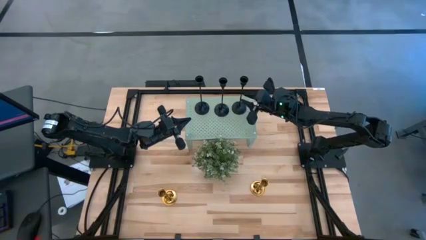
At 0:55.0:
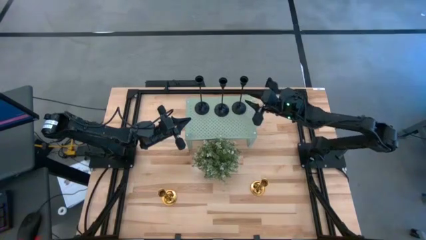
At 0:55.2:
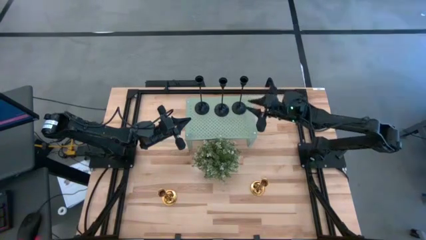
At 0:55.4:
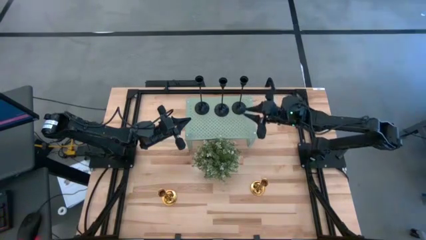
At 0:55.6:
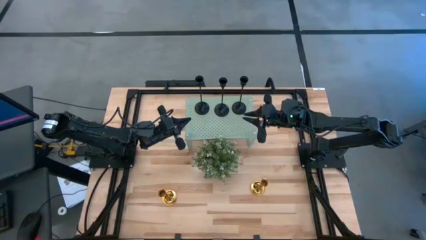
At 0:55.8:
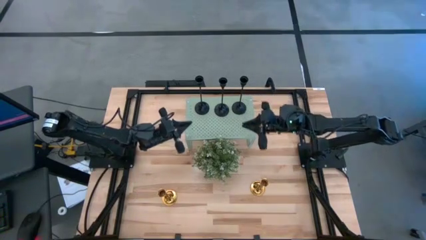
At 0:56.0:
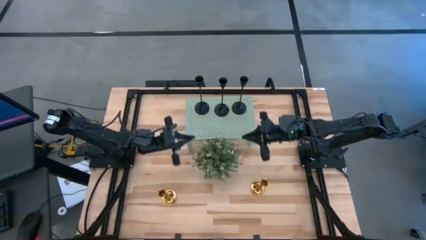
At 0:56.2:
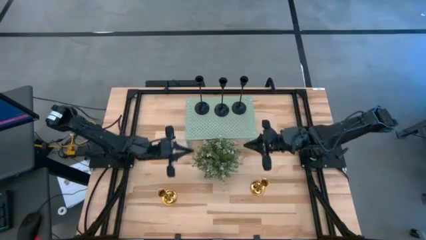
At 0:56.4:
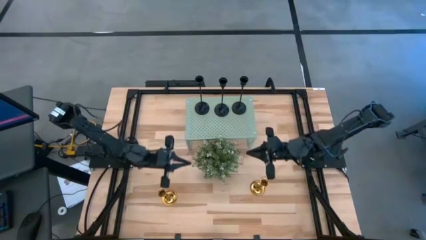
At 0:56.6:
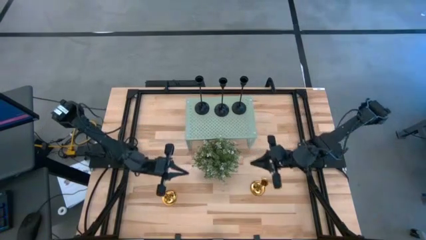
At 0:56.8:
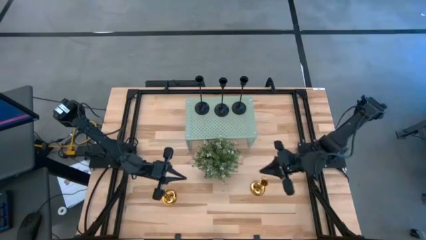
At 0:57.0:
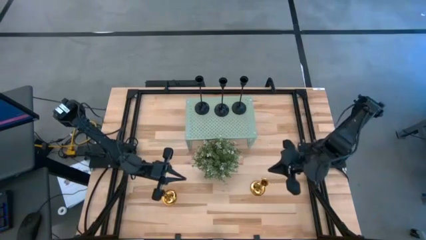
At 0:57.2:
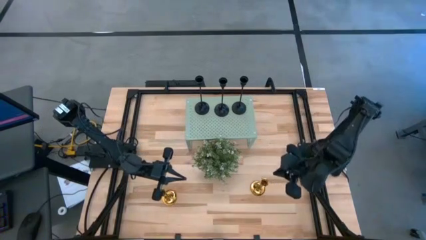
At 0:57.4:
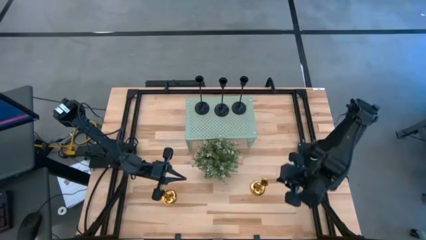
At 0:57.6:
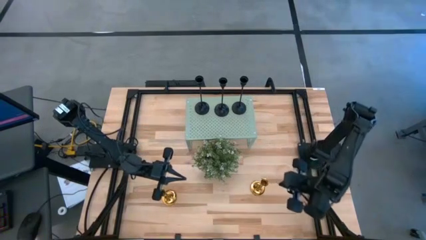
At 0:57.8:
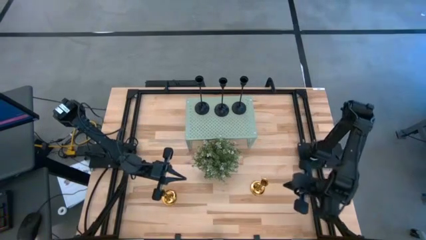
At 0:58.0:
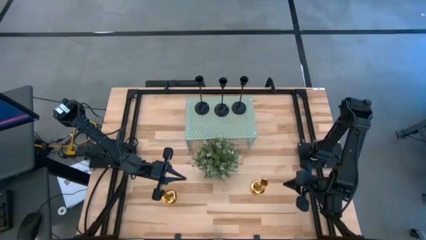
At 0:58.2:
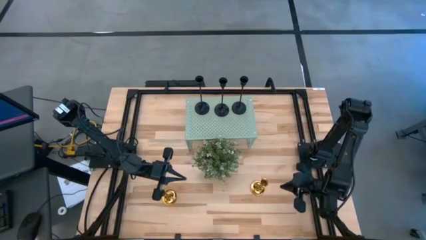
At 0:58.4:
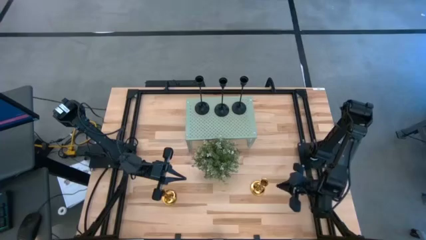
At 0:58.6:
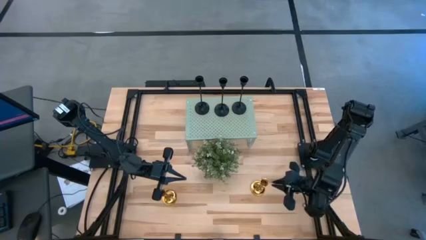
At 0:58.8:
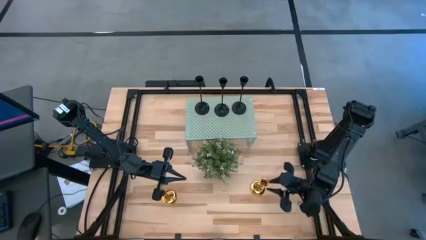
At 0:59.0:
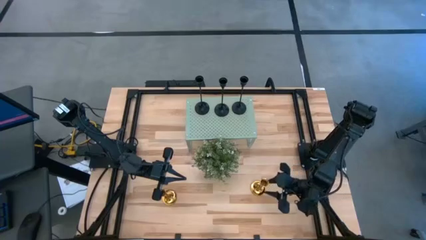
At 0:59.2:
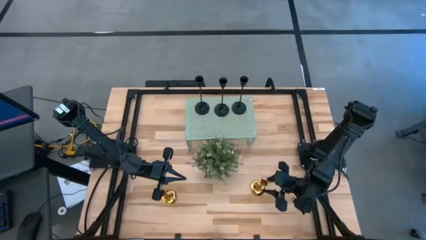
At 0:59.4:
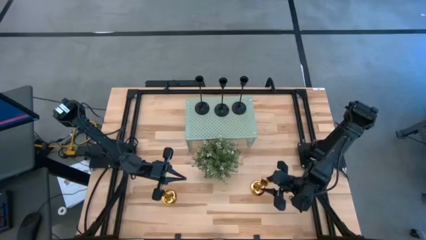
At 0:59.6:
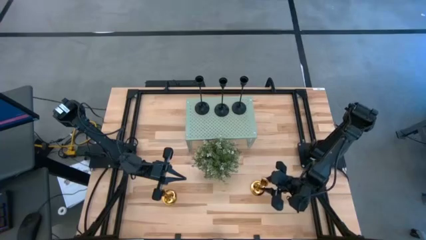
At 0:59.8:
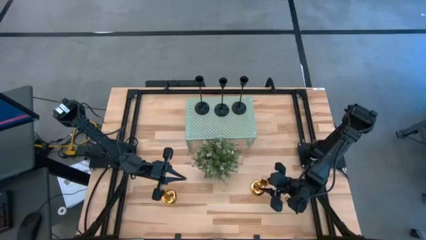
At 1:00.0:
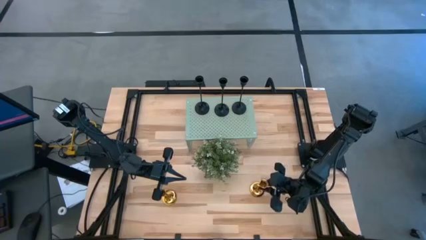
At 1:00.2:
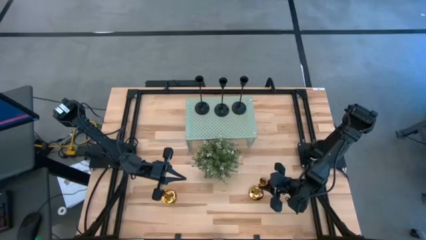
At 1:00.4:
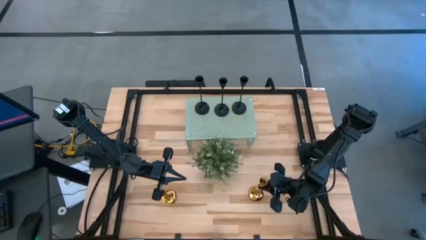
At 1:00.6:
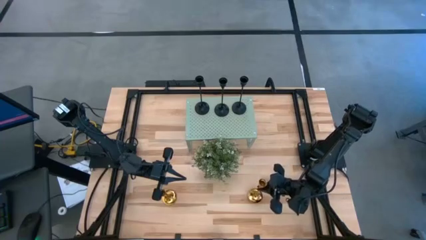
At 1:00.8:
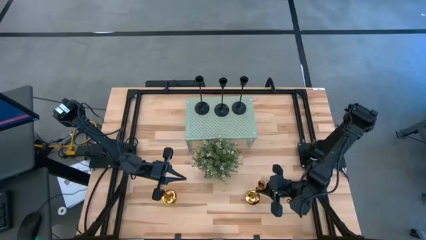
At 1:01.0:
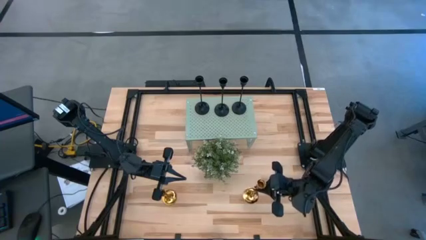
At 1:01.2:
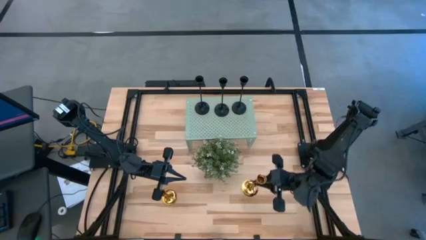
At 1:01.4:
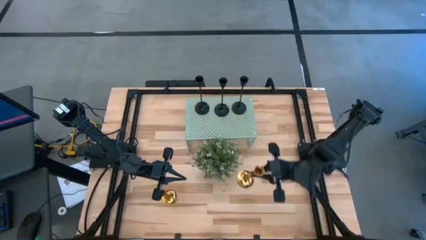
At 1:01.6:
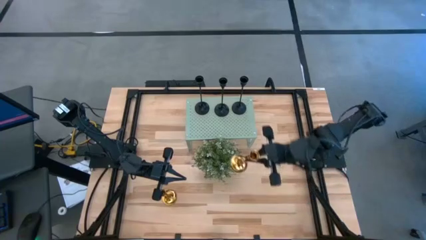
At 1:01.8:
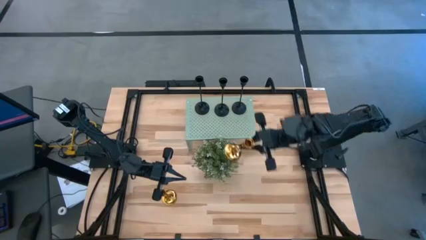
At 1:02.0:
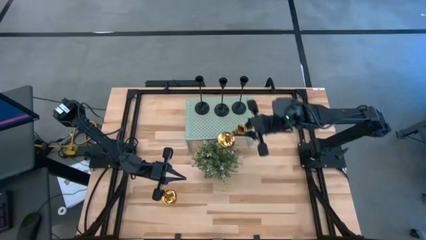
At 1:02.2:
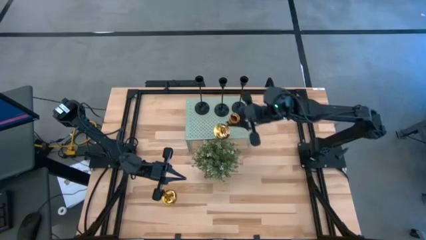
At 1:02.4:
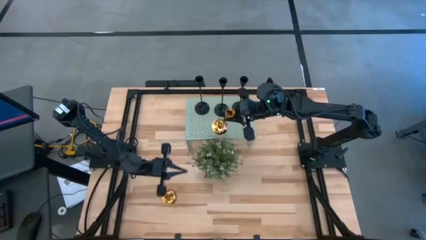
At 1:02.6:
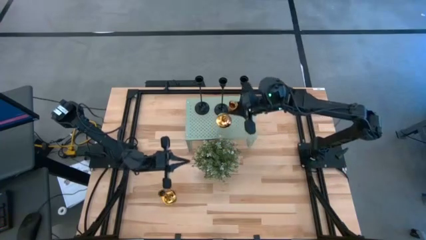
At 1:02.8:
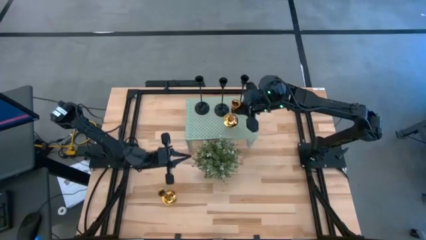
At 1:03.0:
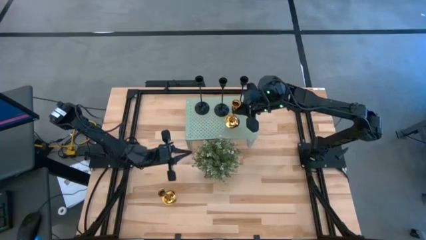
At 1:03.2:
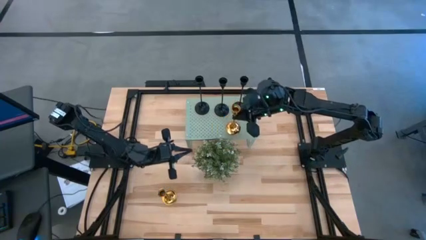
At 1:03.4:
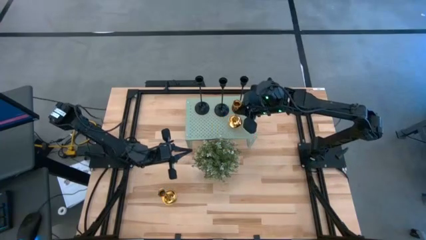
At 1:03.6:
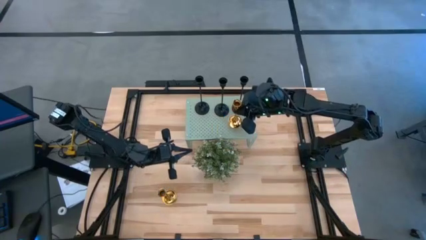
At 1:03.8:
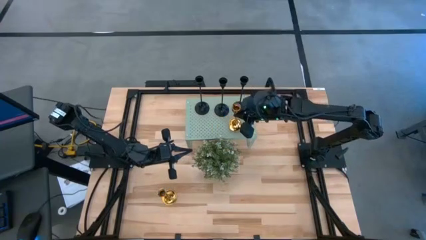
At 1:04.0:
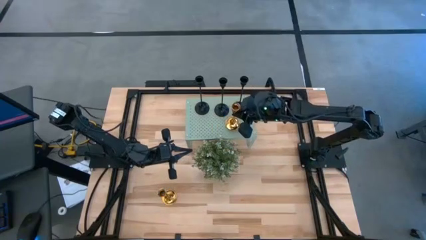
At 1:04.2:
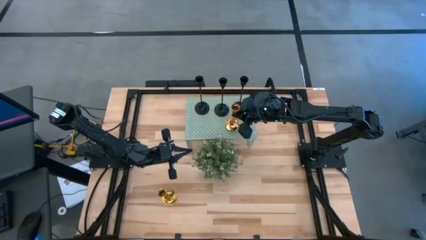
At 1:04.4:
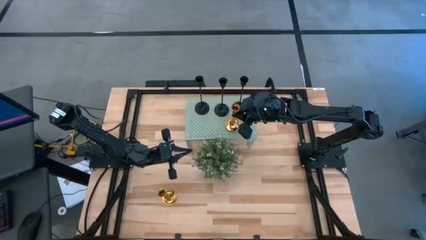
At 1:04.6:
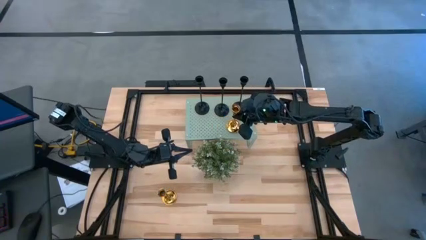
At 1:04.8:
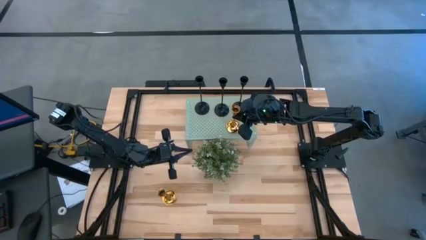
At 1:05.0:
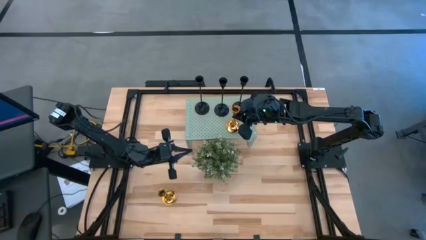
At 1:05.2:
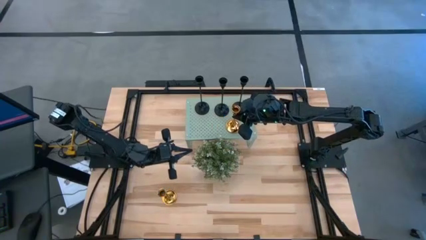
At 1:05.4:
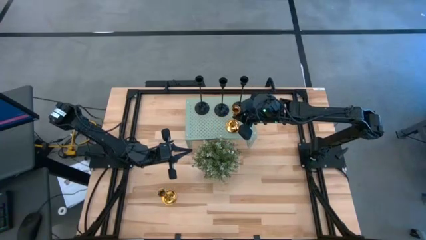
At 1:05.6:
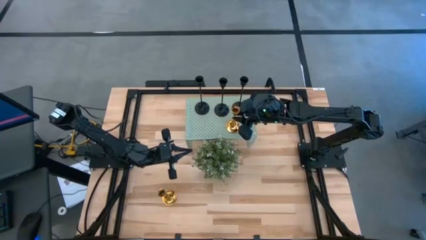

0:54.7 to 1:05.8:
Task: Pick & Place candle stick holders
Put the right gold candle holder on the shelf

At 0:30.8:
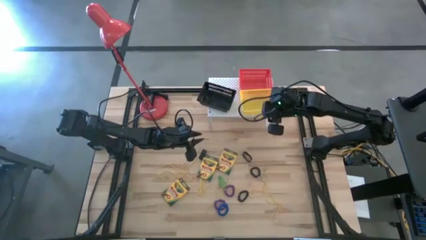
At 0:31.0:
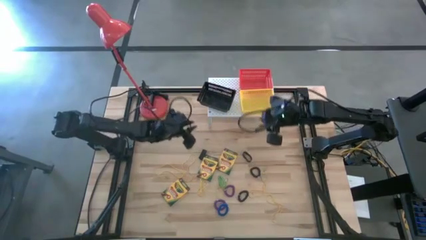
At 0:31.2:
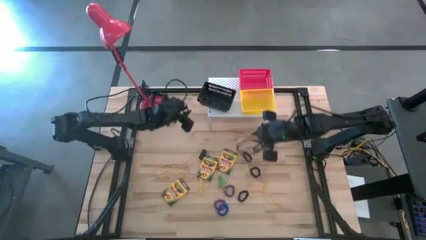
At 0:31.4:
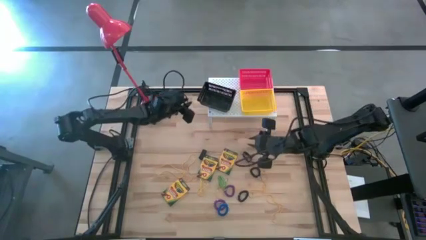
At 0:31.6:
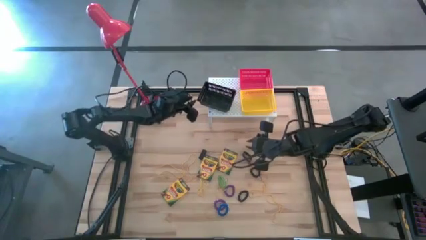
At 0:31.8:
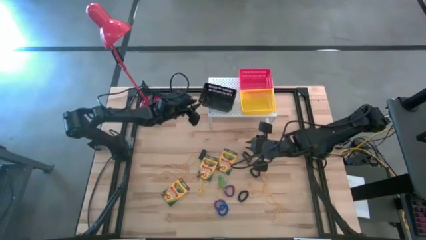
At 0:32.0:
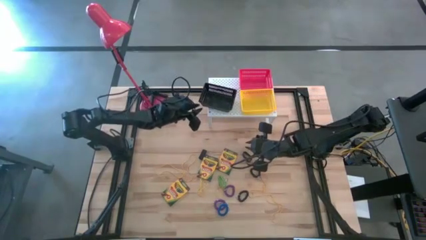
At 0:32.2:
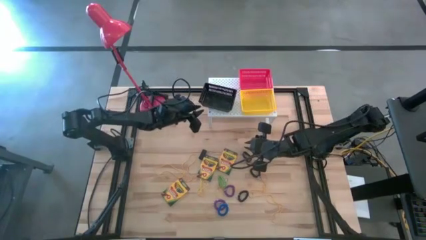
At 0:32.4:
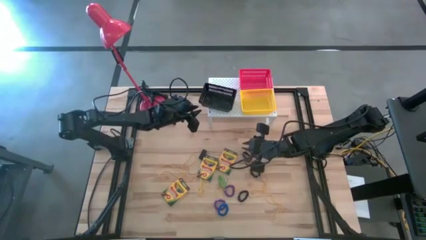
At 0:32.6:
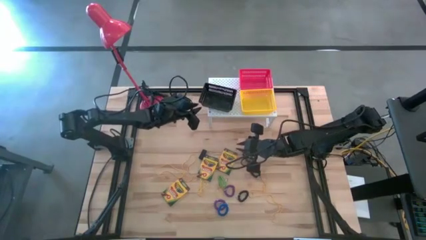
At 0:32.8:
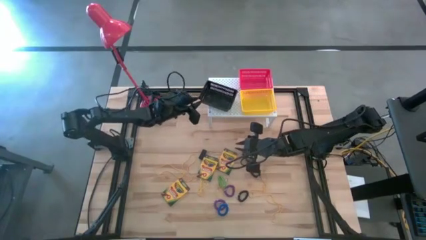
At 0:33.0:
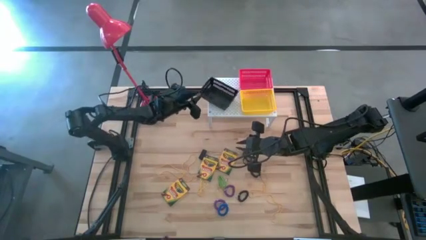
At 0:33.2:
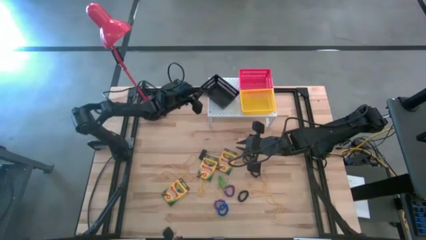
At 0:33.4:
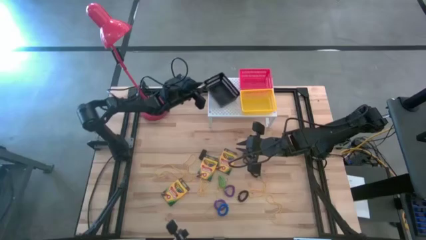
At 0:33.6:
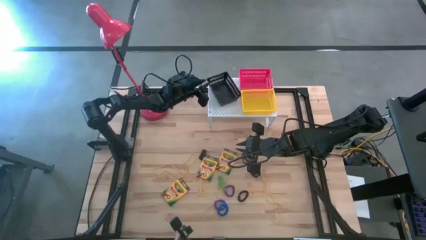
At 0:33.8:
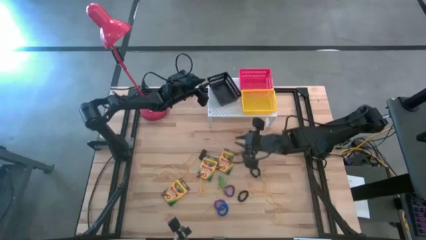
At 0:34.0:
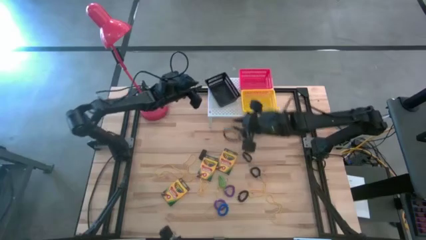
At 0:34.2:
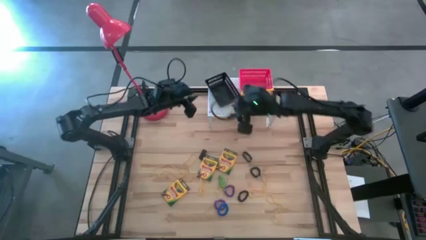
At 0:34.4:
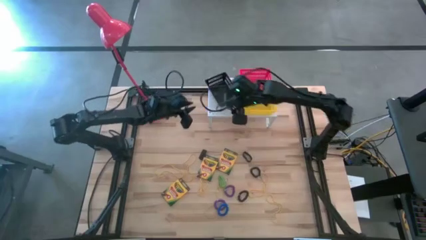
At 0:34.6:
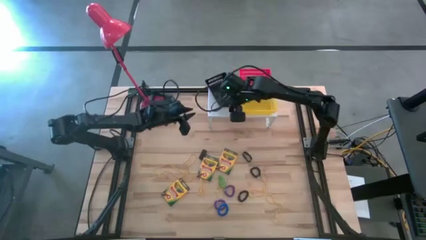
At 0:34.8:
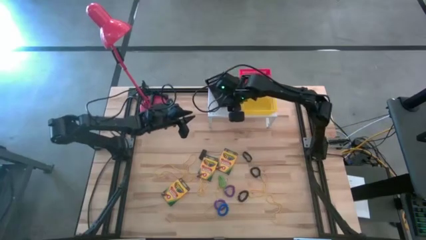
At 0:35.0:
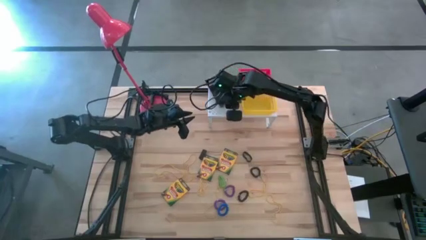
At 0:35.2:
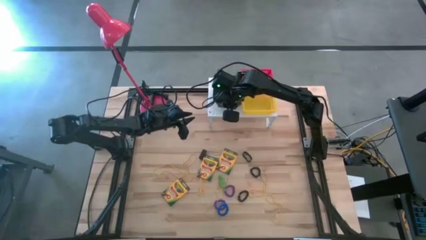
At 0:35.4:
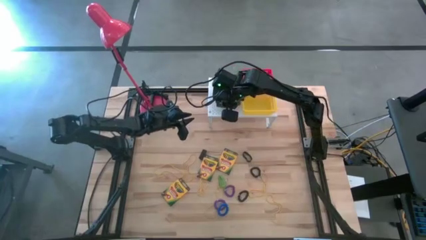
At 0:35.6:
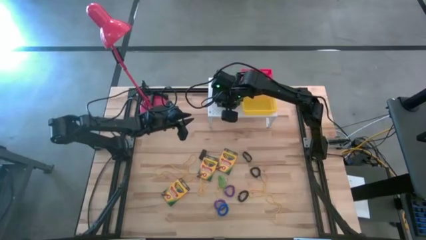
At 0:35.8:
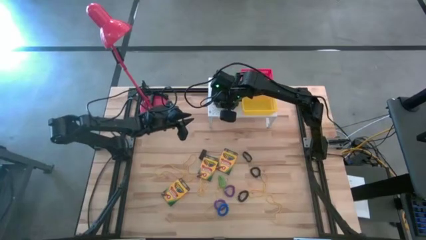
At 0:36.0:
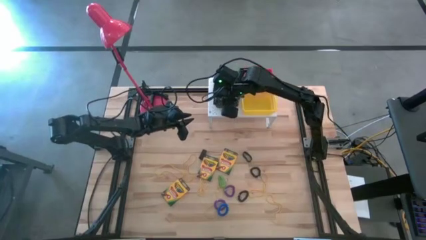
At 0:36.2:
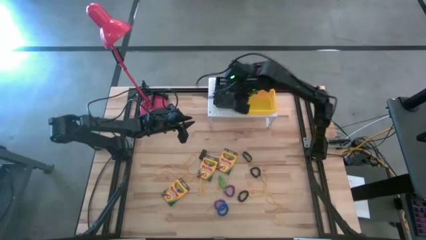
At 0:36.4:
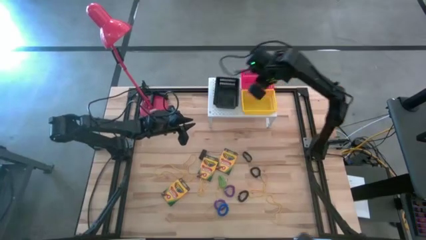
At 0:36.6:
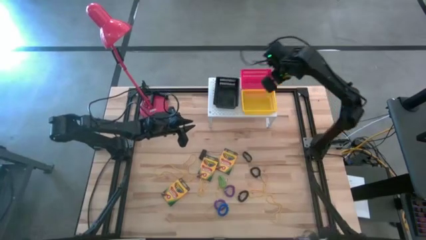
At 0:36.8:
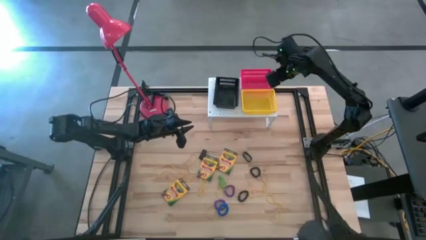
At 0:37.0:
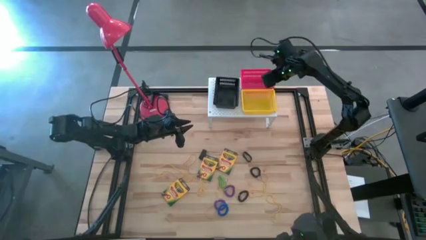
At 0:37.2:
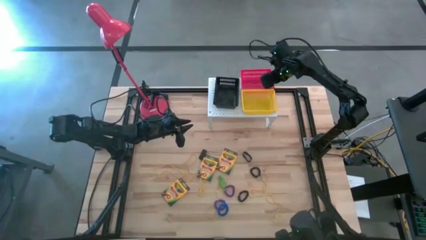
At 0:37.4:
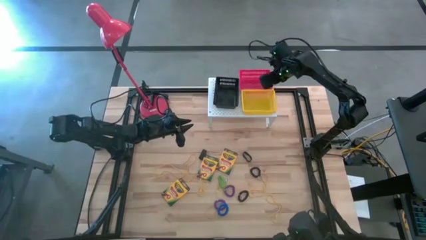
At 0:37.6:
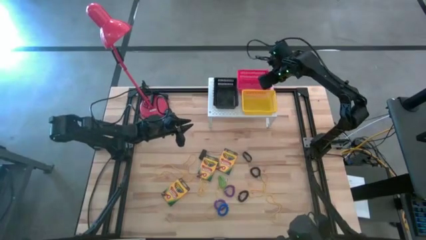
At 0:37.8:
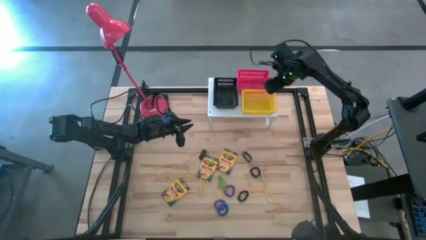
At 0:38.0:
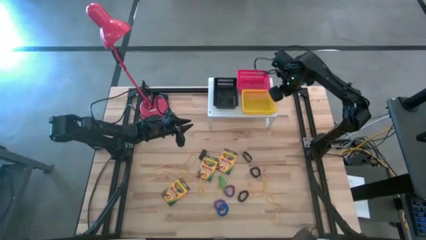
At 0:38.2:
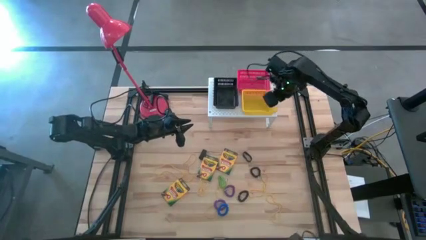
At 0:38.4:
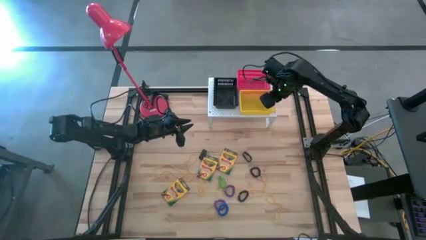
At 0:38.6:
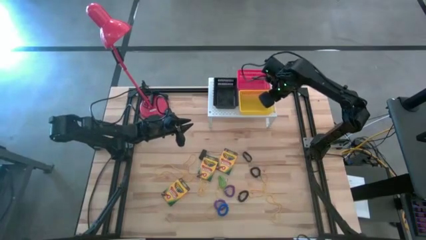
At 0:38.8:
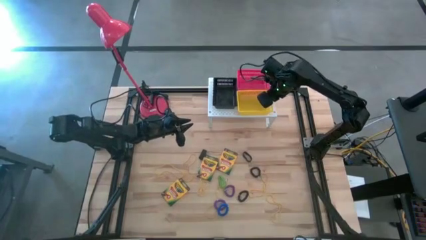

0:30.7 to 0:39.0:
Task: Pick & Place Office Desk Supplies
Adjust the bins on the shelf
